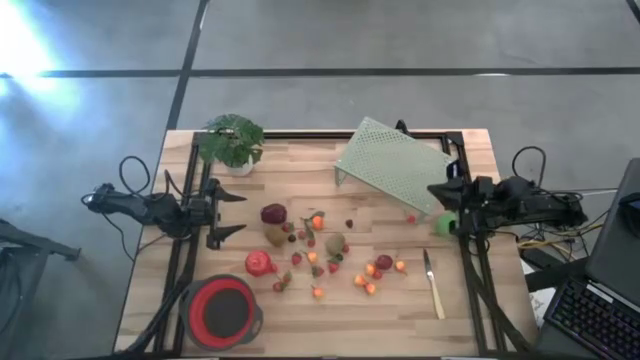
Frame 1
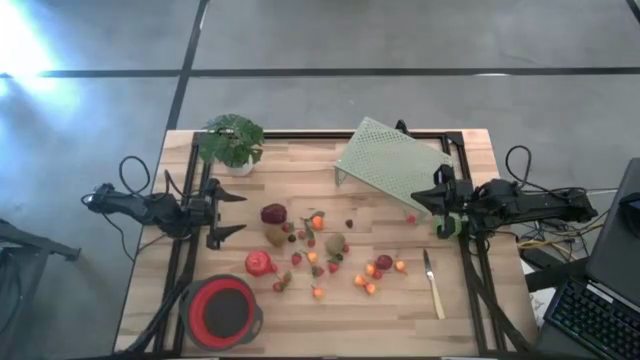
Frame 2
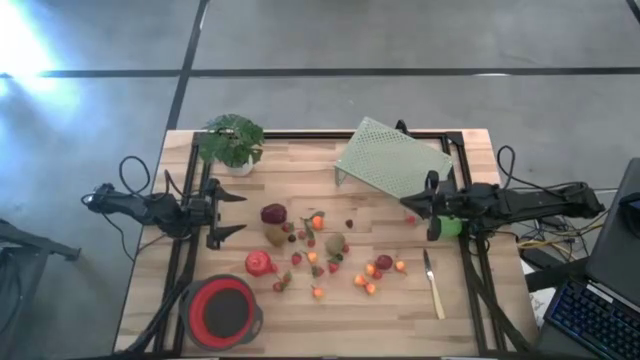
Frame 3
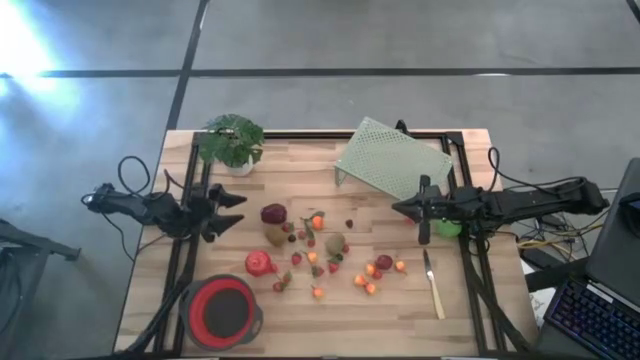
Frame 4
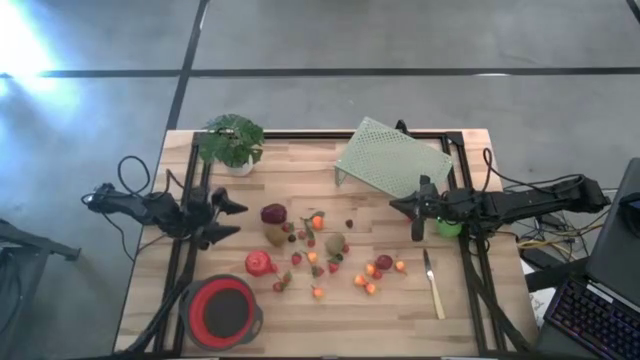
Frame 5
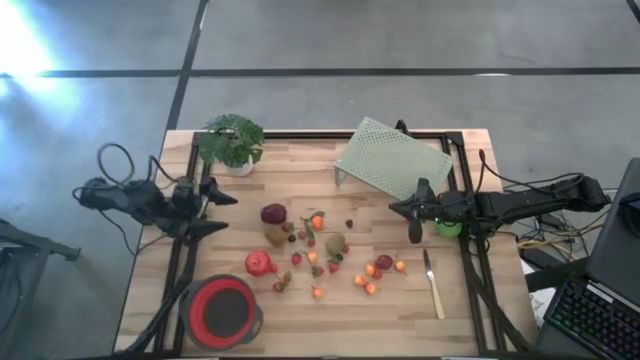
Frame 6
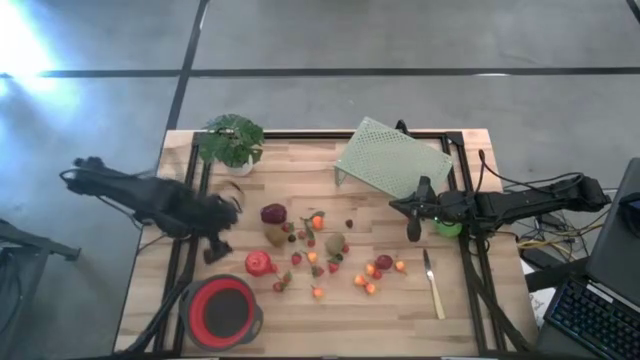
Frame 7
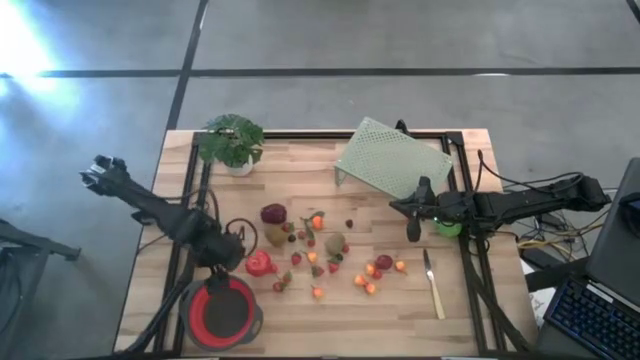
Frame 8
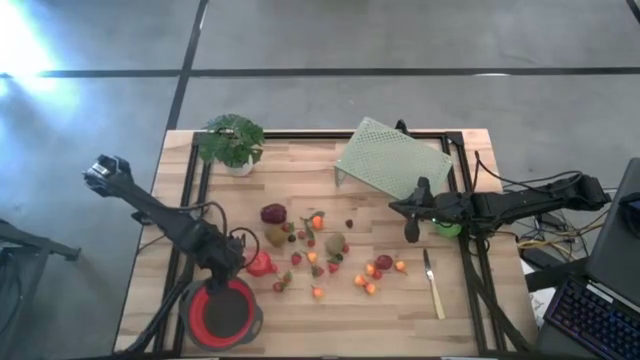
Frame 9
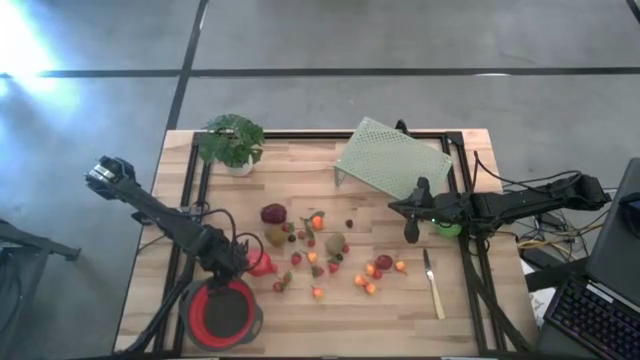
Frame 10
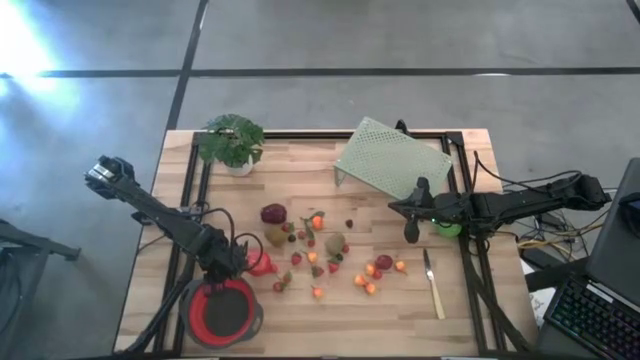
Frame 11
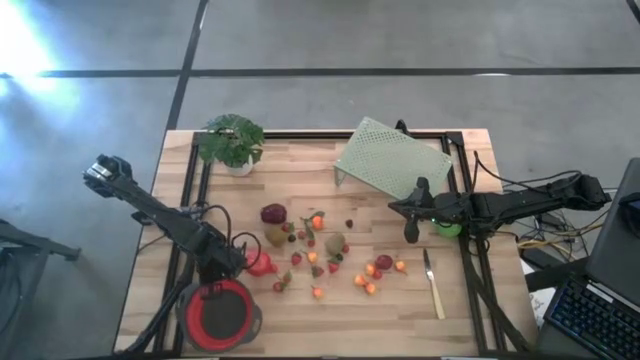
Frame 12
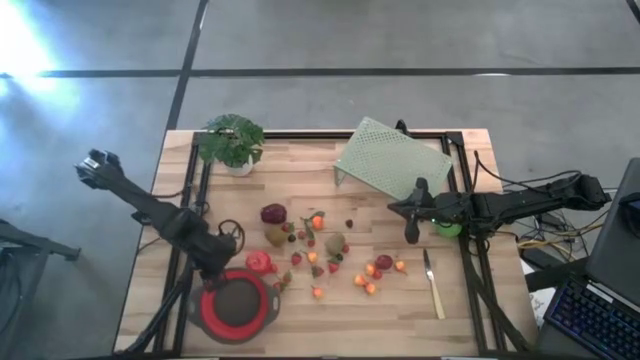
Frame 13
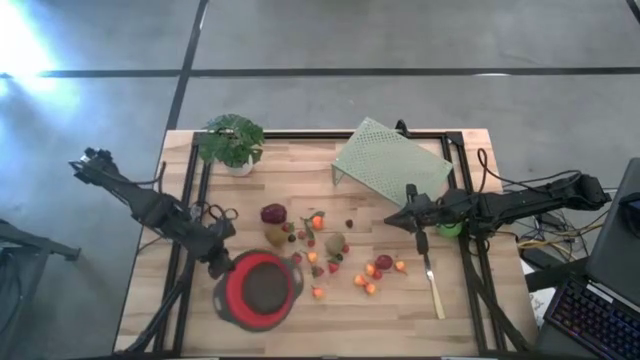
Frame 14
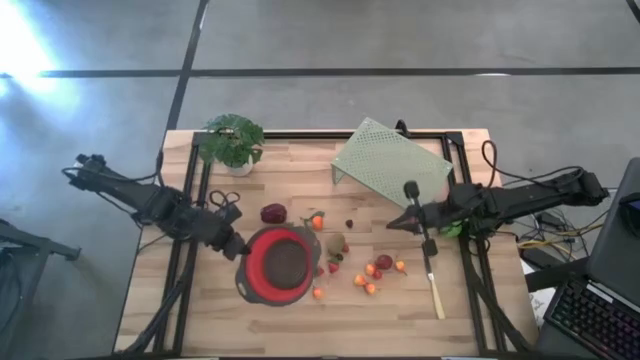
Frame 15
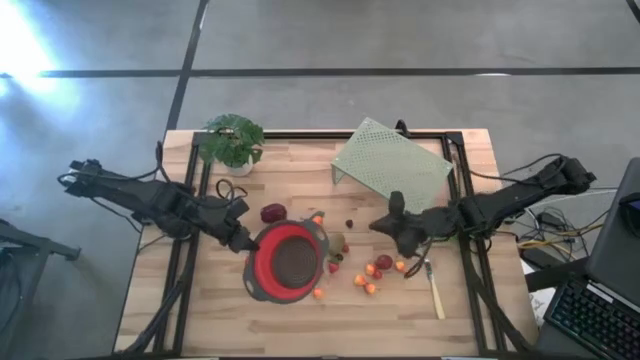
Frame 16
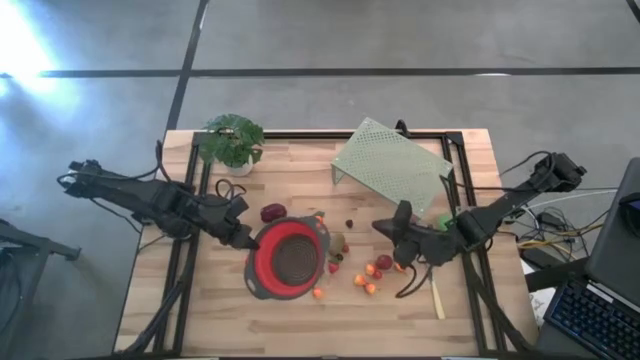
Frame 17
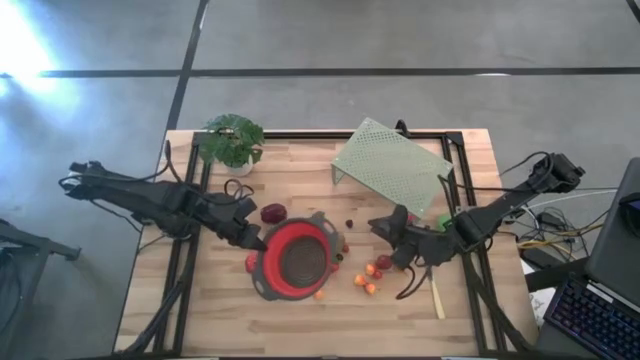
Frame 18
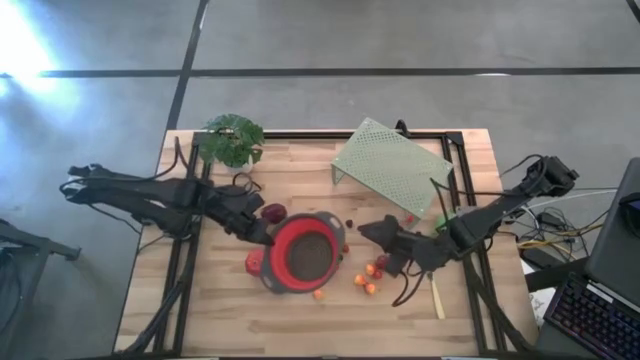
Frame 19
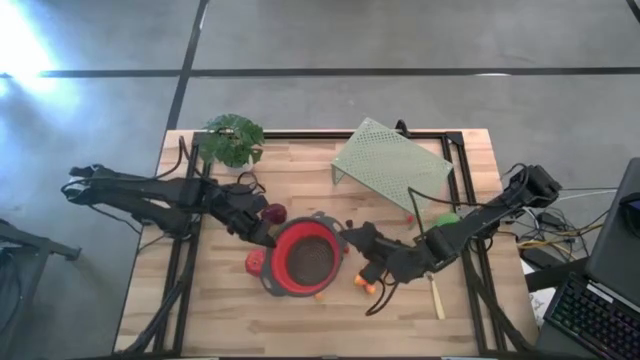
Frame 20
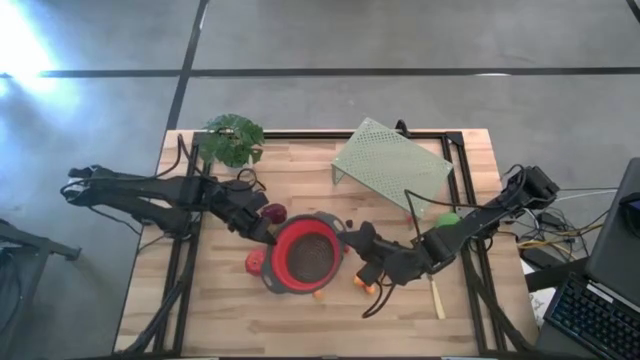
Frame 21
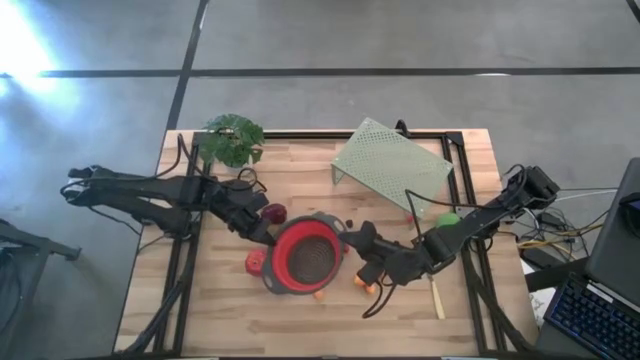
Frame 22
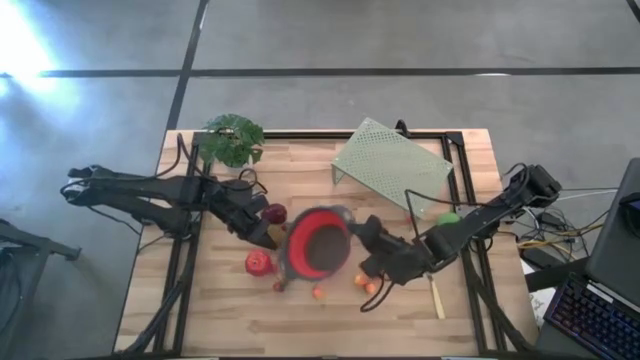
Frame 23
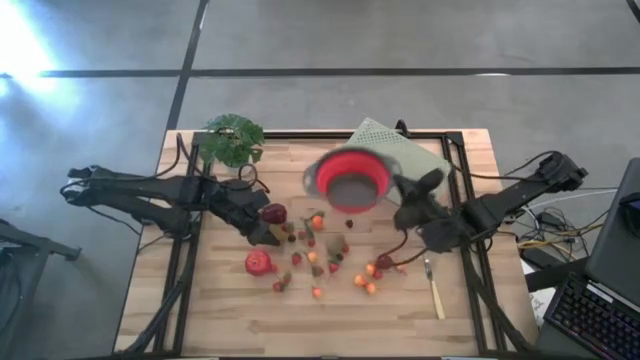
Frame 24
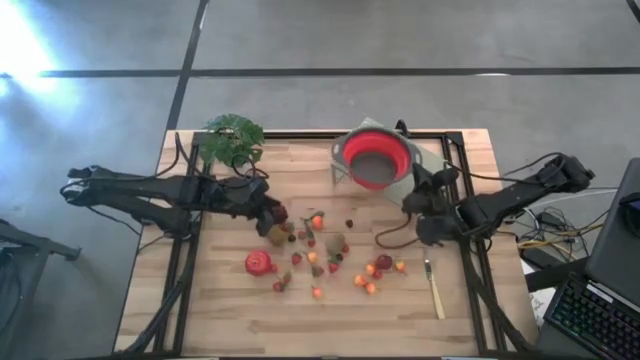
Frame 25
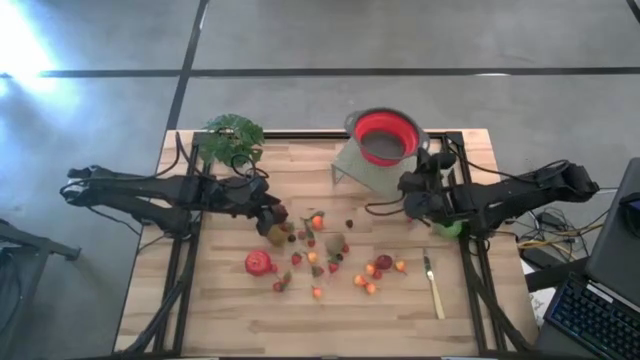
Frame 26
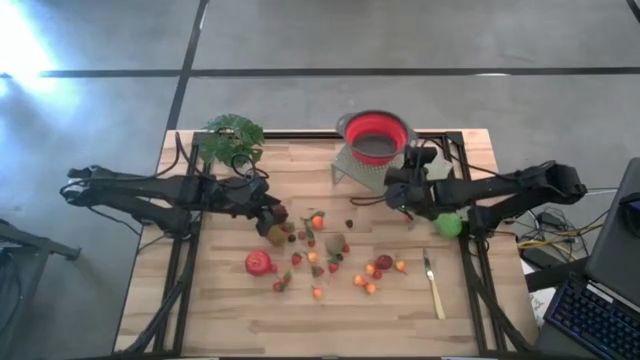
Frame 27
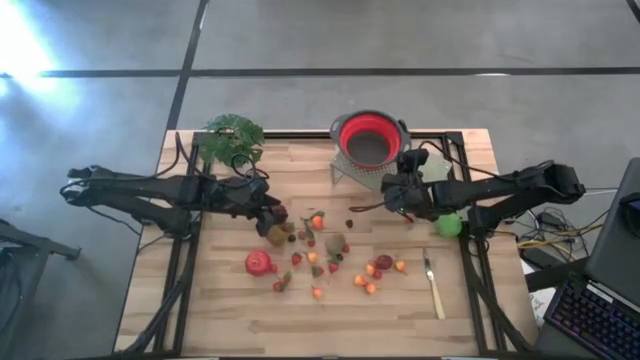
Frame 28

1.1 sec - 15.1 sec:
Task: Pick & Place Fruit
Put the strainer bowl on the shelf

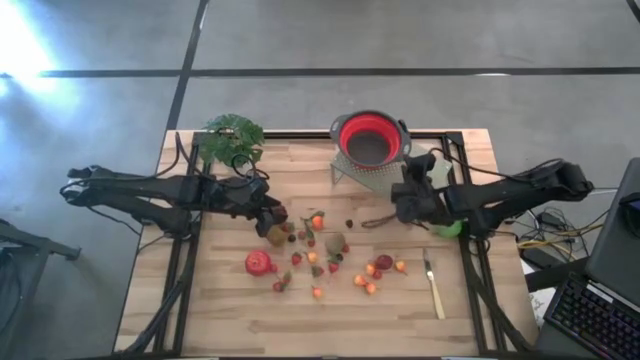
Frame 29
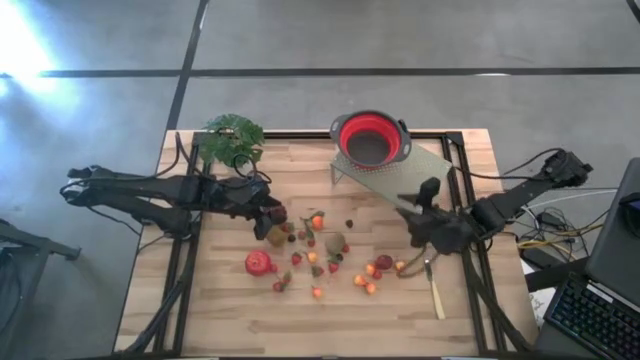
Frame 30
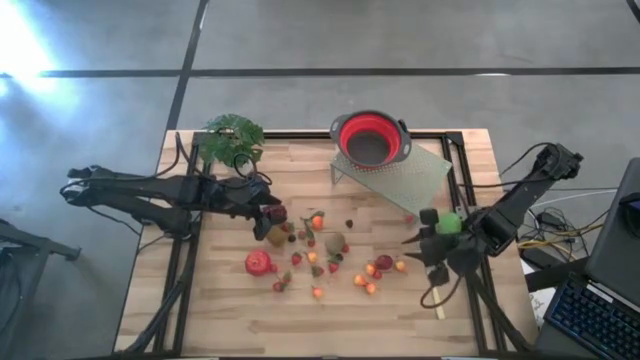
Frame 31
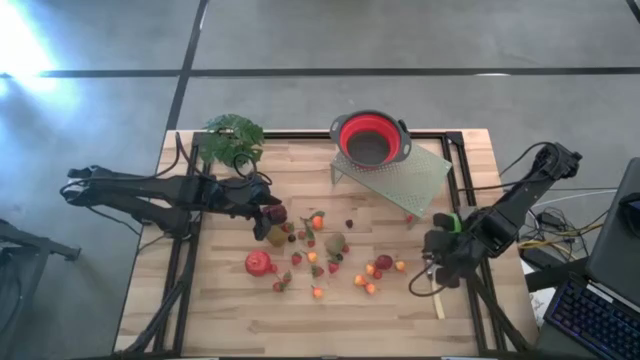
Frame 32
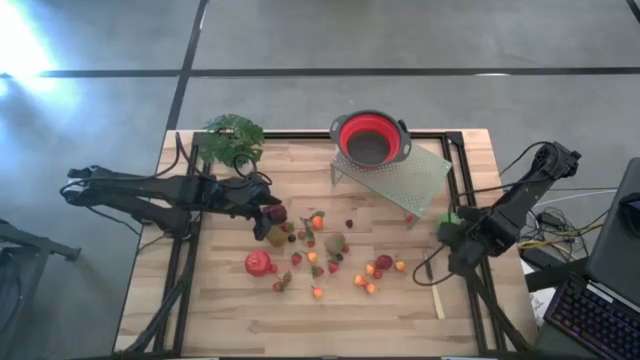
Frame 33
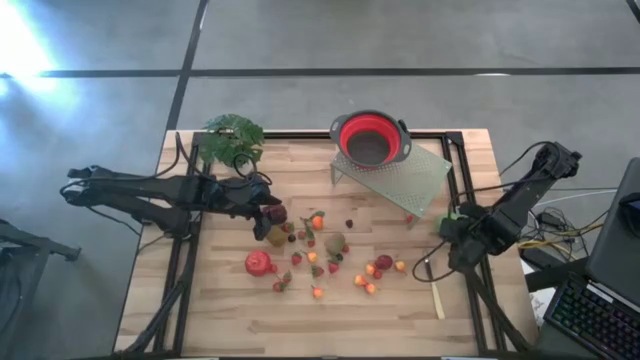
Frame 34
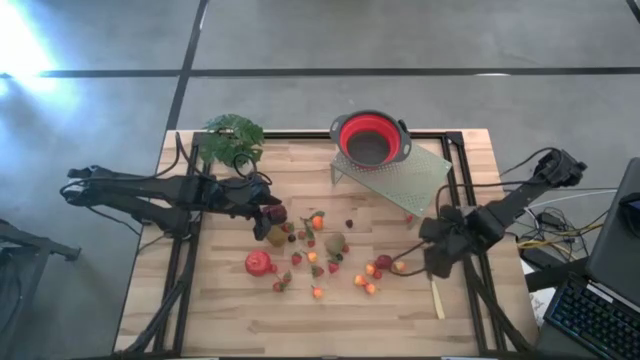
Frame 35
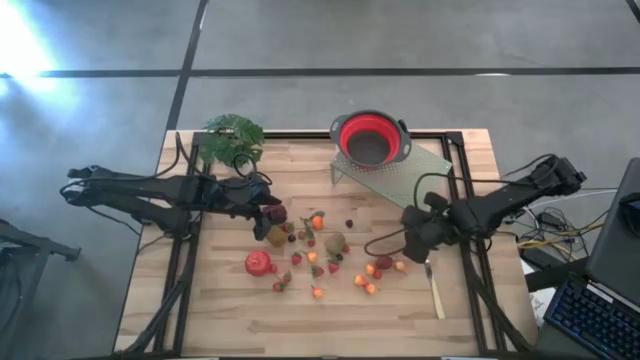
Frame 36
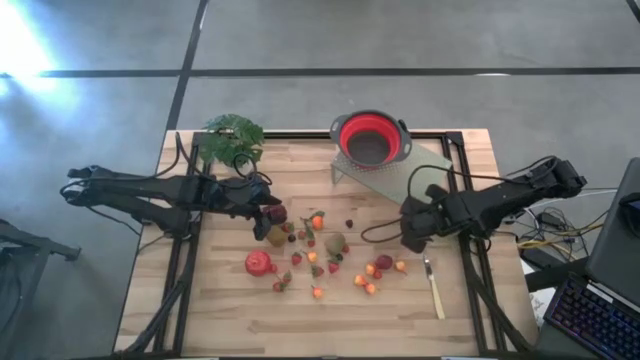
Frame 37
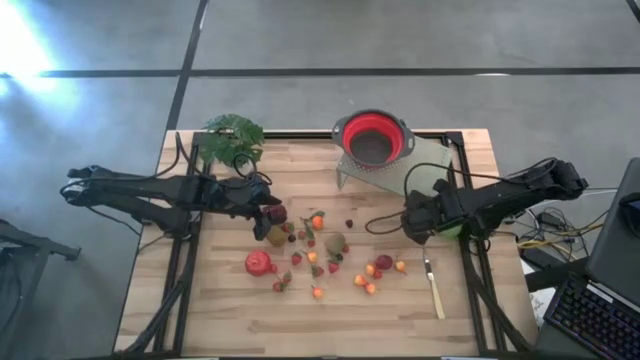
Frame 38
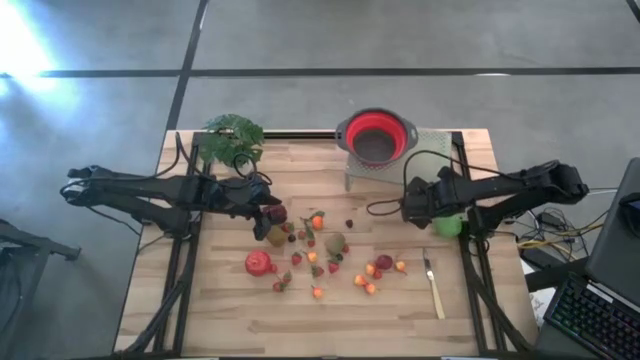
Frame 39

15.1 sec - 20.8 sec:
Adjust the shelf
